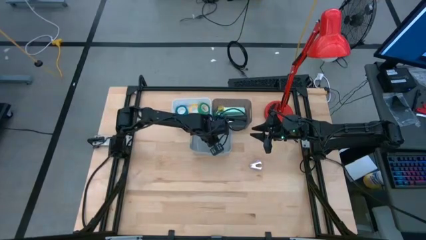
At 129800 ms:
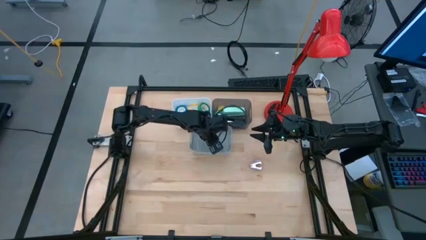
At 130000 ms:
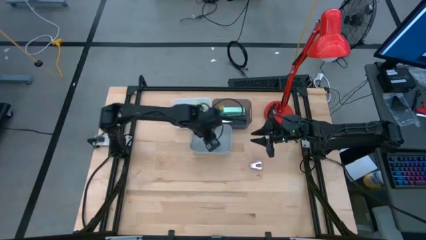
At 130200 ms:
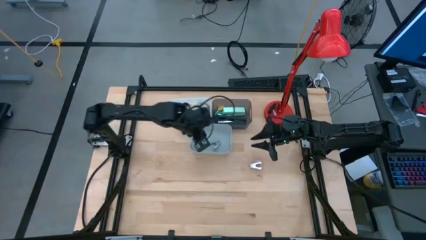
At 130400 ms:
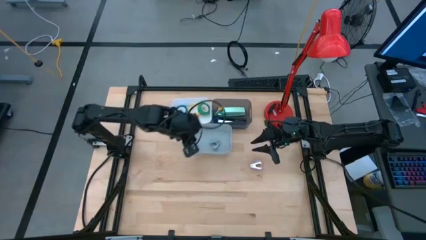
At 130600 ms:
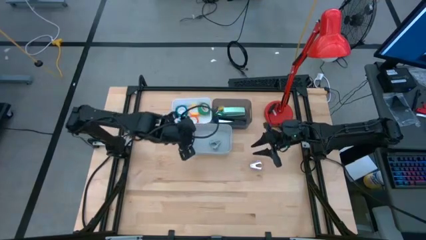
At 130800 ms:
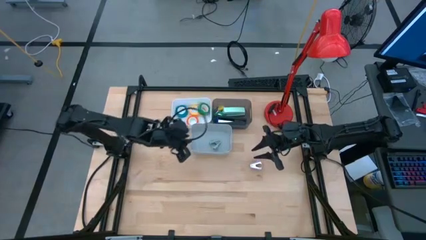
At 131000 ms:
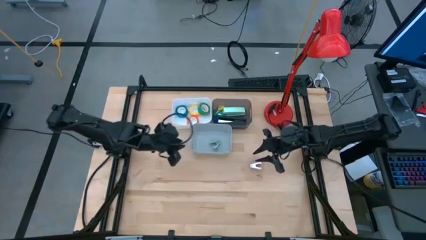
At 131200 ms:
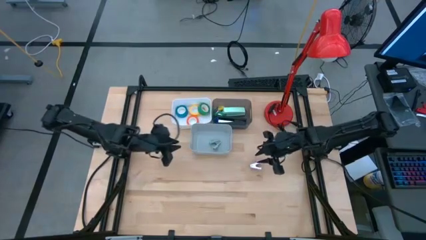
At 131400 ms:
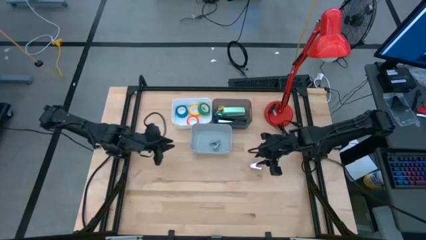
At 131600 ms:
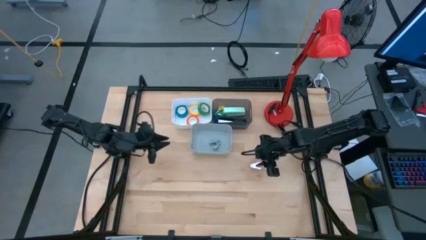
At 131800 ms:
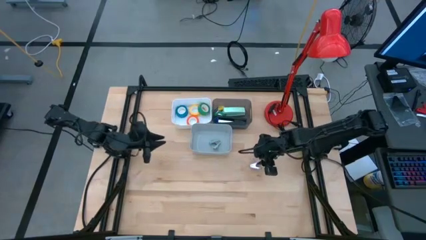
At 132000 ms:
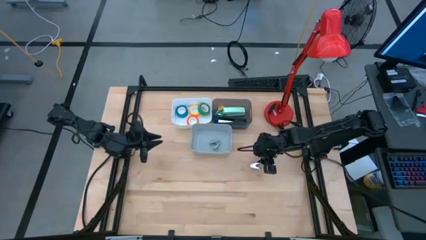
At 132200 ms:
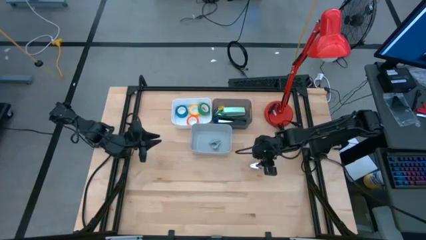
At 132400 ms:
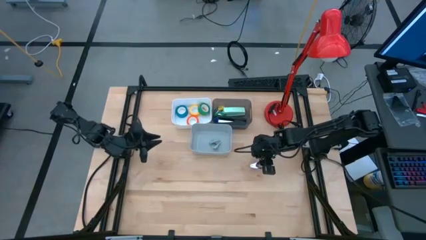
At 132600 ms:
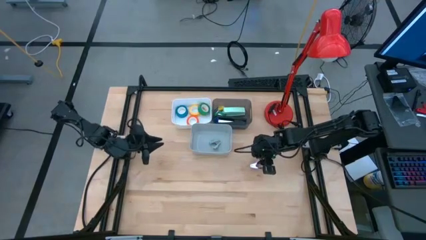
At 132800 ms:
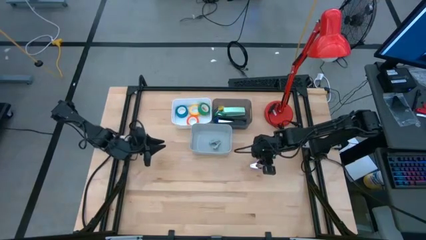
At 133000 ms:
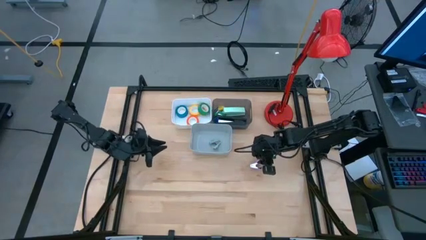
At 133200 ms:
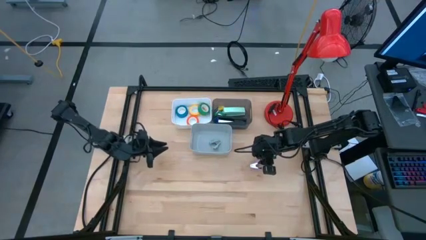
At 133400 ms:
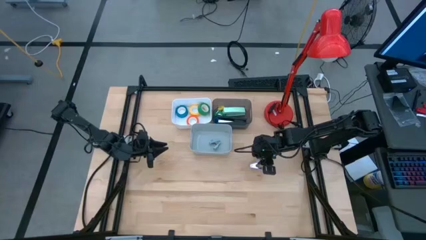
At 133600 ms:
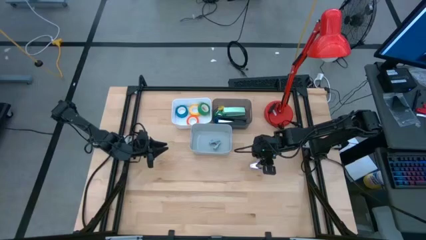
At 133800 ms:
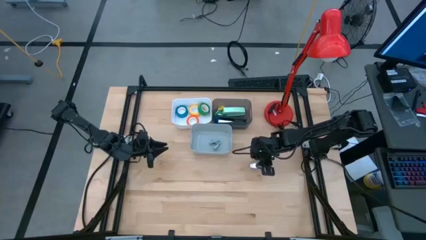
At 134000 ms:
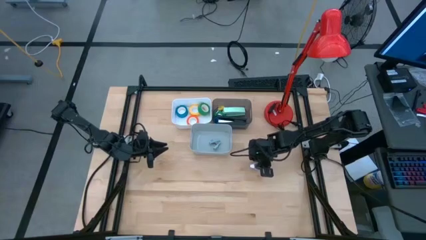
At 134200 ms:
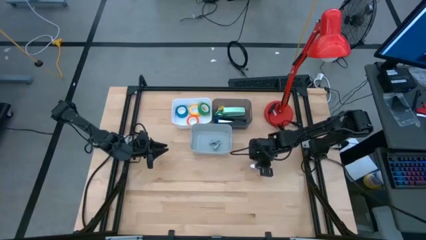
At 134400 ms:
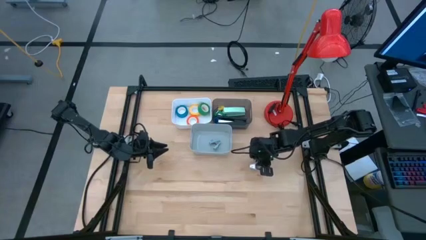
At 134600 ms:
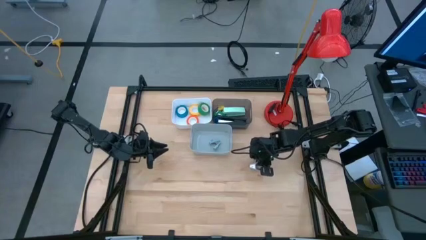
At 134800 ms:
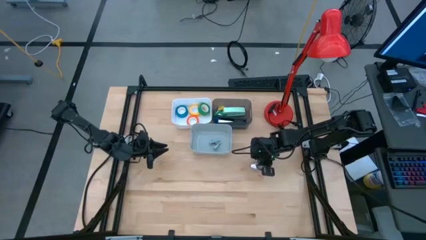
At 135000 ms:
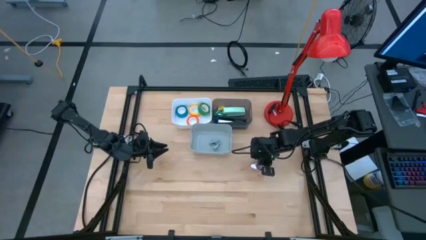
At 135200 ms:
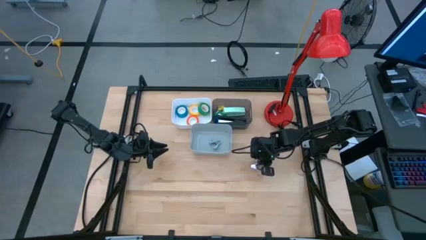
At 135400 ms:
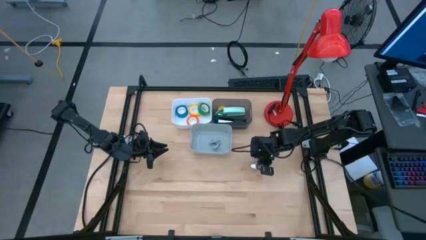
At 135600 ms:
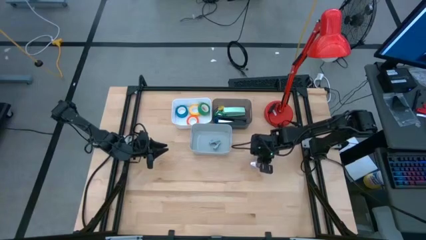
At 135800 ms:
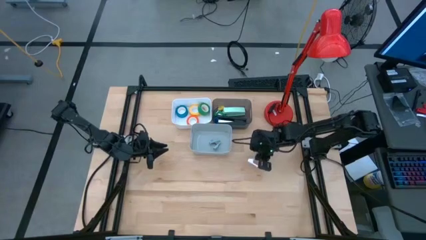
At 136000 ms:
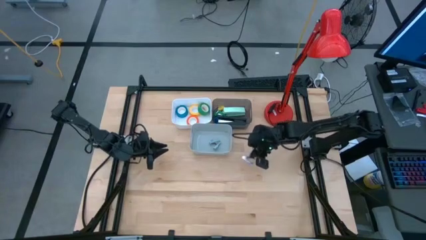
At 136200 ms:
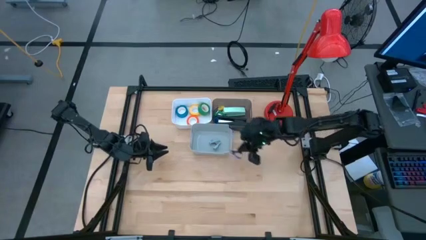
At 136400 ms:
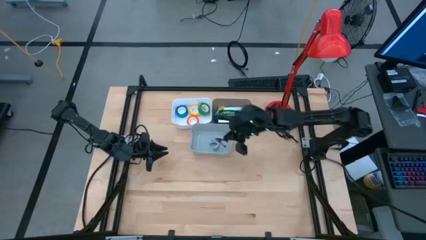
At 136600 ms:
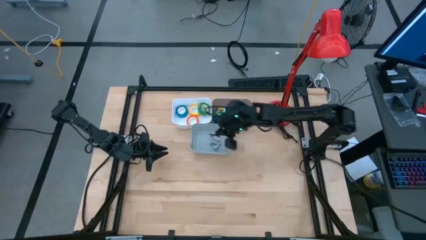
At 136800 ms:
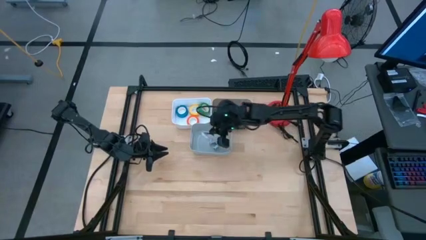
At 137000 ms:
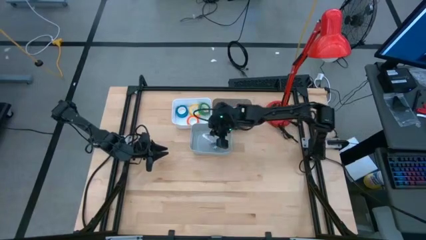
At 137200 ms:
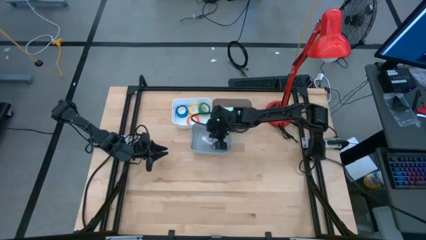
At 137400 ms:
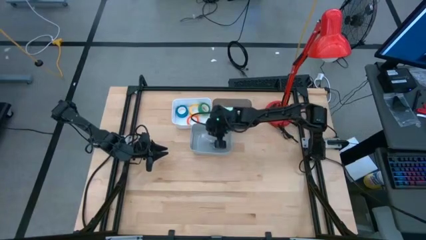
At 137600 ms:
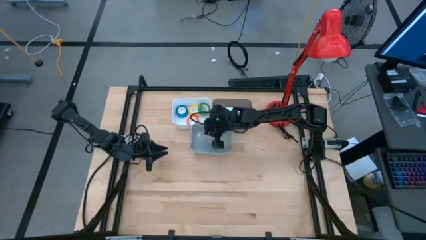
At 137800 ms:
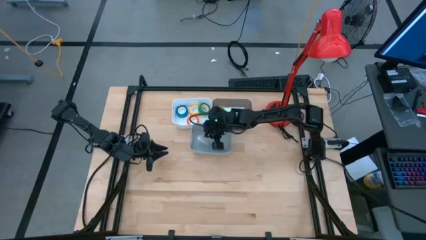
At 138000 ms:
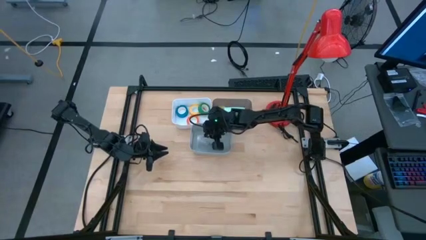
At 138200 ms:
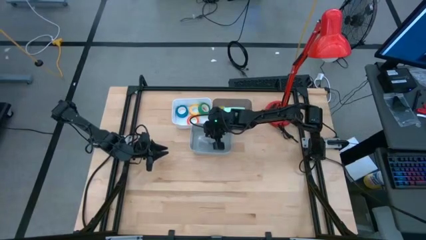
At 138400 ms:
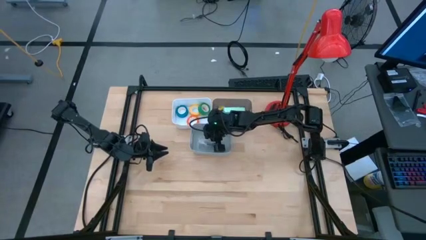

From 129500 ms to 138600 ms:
Task: Pick and place Stapler, Stapler remover, tape
Put the light purple staple remover into the gray bin

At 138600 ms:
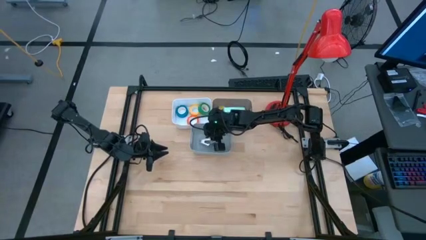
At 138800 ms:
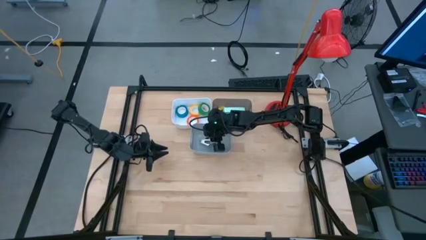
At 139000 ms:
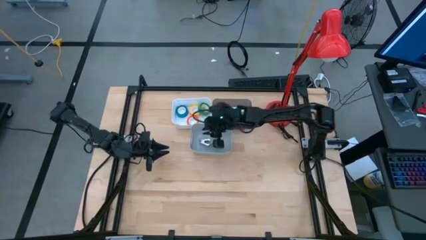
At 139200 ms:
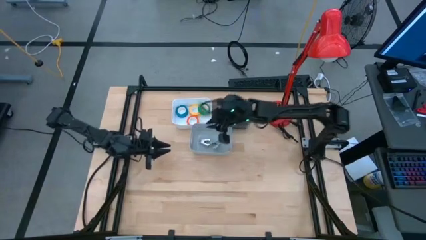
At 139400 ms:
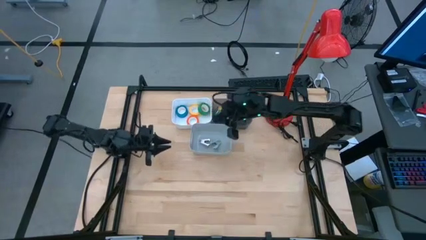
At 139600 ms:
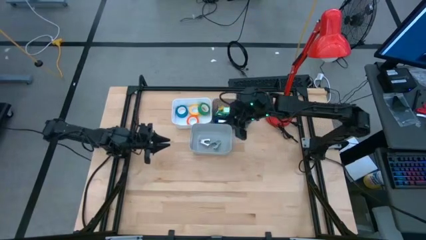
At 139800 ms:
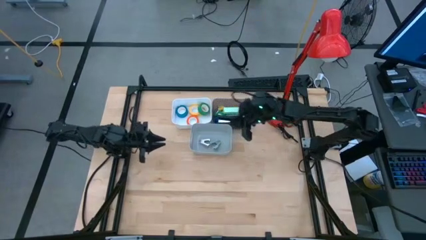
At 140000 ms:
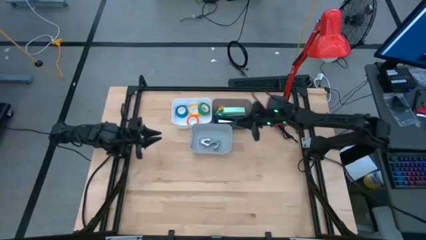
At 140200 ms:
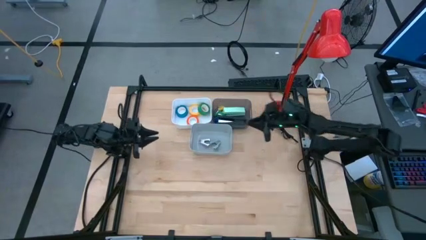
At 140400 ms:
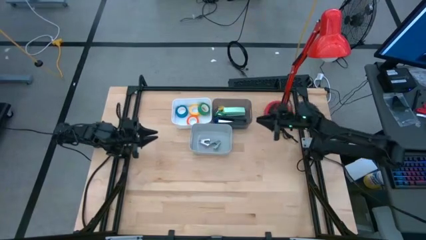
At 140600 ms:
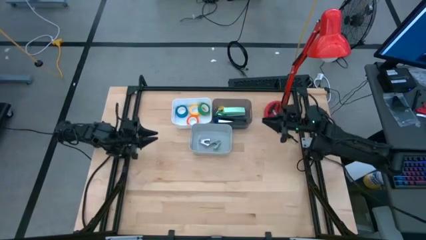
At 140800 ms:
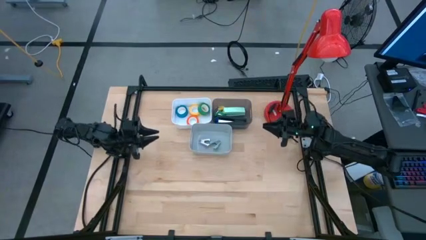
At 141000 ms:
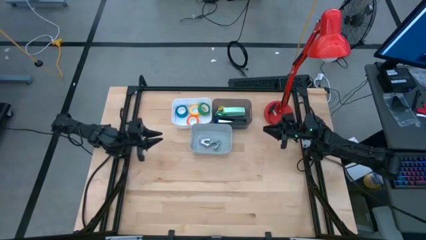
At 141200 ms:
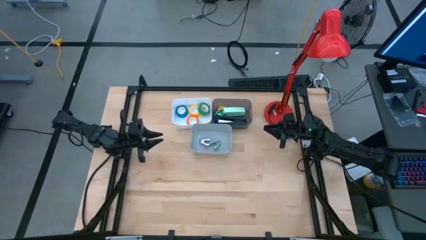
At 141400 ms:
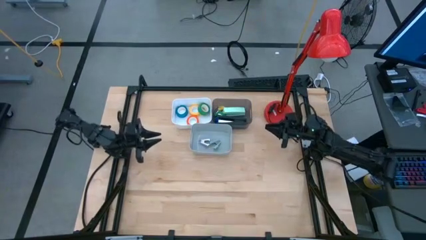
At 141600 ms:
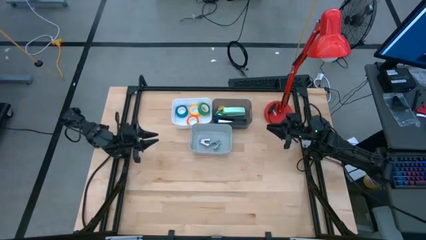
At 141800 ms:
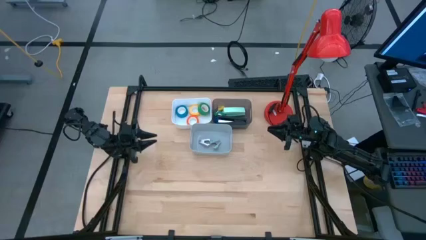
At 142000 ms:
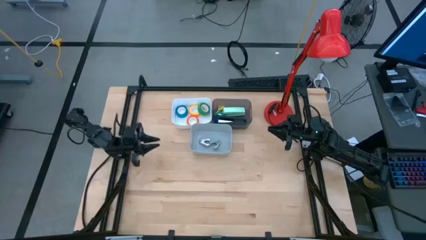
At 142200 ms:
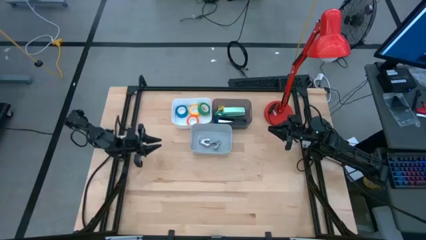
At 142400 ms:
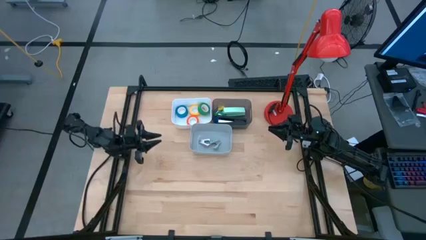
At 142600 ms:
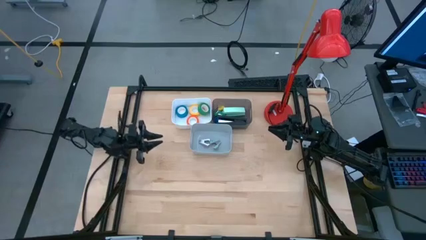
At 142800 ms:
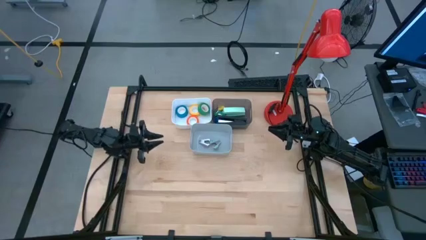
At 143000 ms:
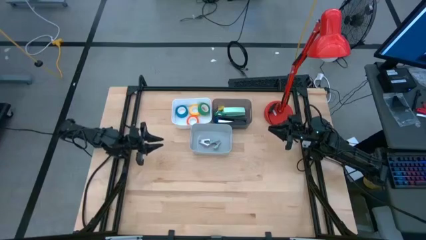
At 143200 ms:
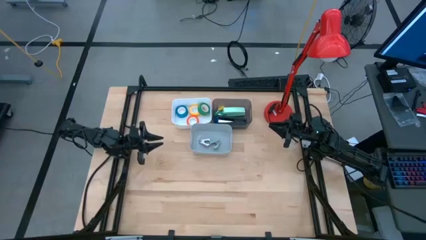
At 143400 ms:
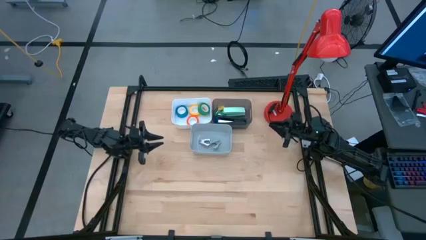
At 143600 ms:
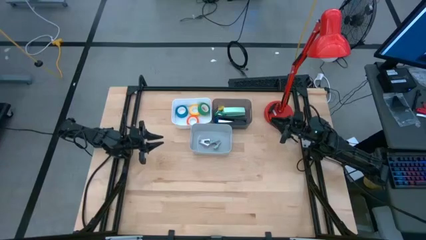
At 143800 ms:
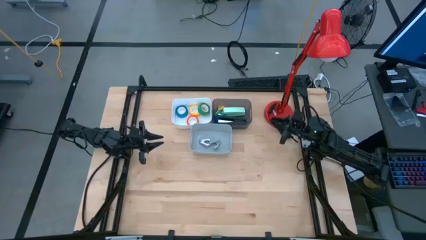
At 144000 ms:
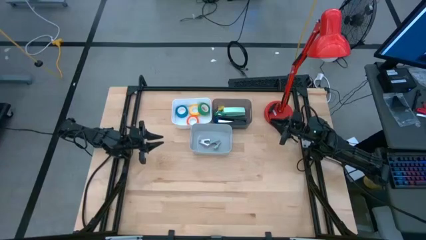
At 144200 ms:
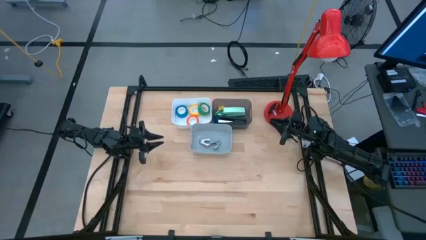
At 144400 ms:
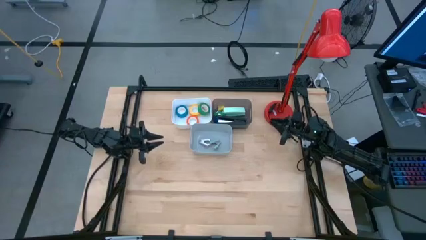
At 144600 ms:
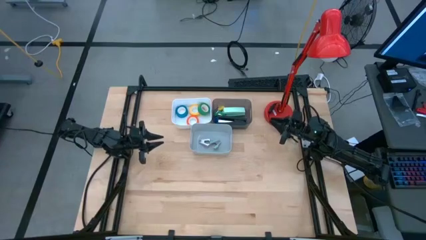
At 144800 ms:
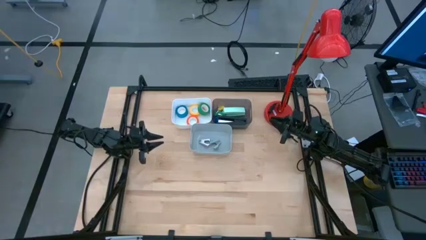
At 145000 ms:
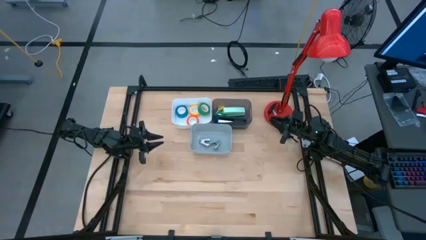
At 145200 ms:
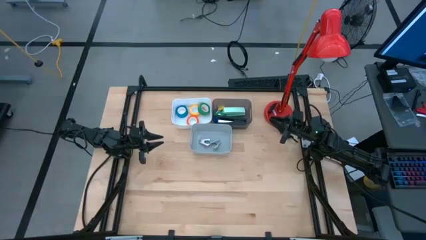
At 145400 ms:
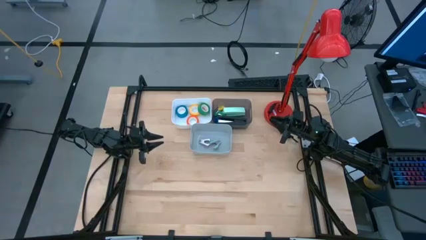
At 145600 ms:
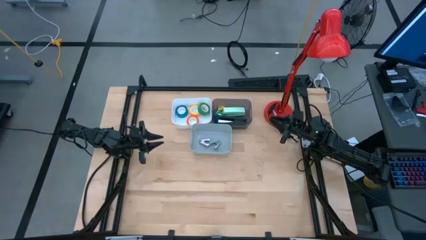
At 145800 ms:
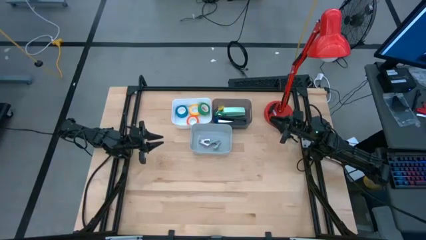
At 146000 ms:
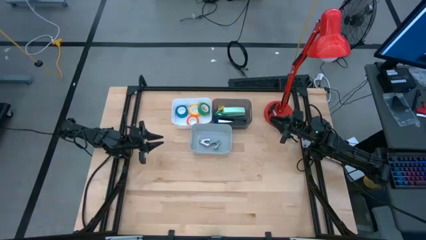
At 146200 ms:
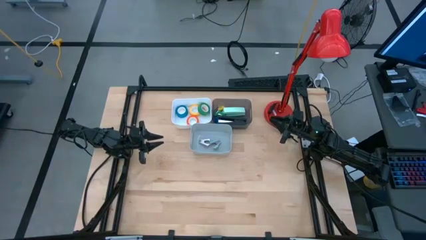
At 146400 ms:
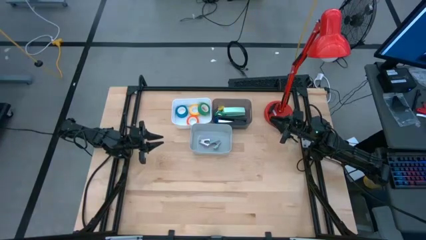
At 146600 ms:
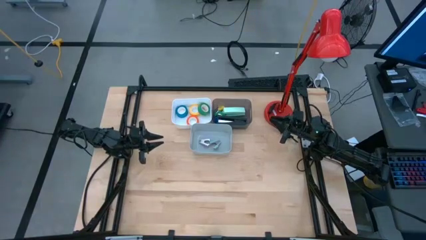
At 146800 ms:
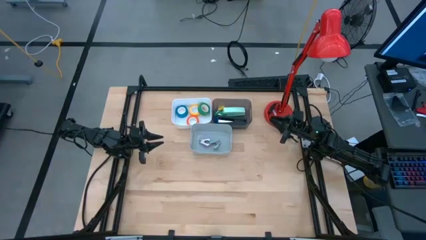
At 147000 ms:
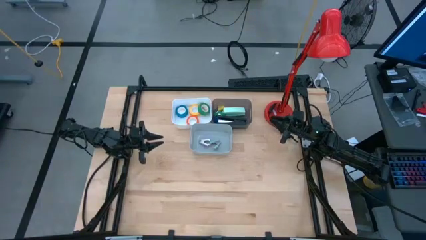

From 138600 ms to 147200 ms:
Return to Home Position
